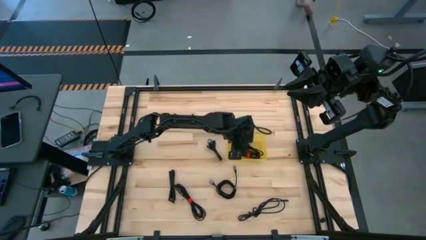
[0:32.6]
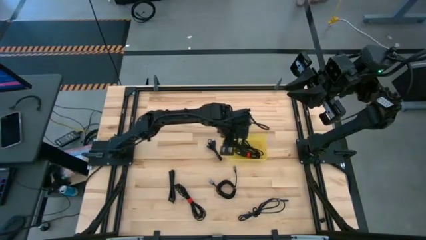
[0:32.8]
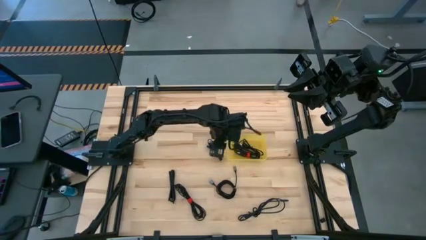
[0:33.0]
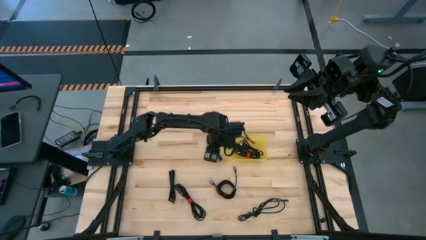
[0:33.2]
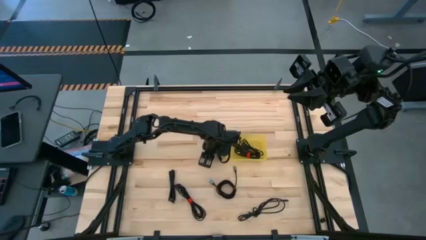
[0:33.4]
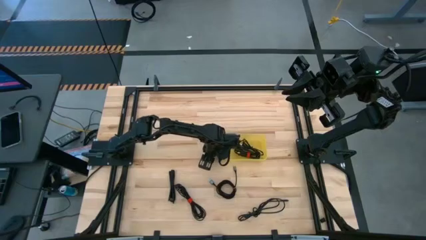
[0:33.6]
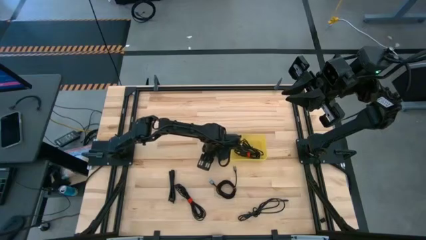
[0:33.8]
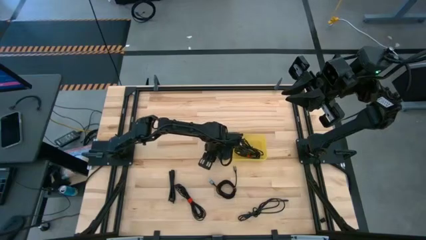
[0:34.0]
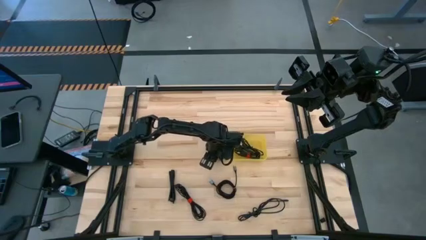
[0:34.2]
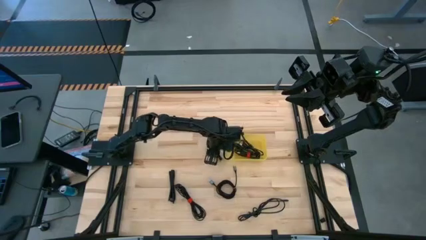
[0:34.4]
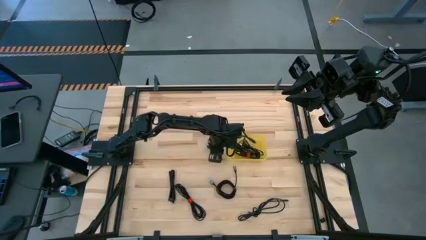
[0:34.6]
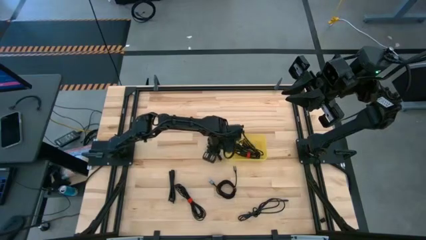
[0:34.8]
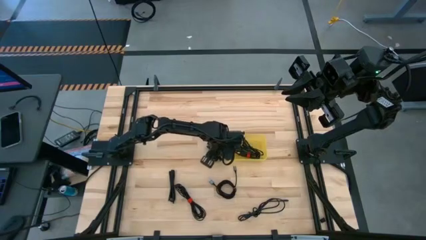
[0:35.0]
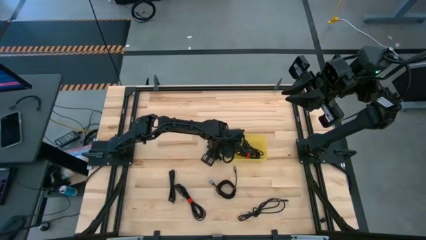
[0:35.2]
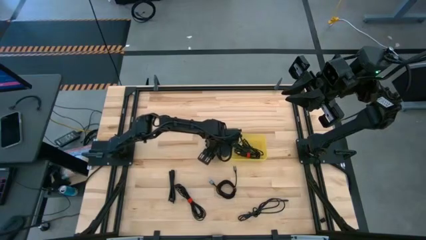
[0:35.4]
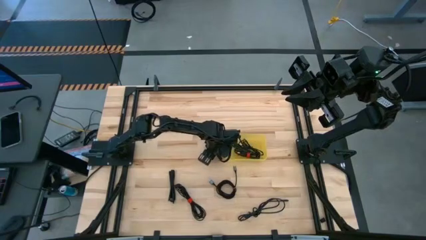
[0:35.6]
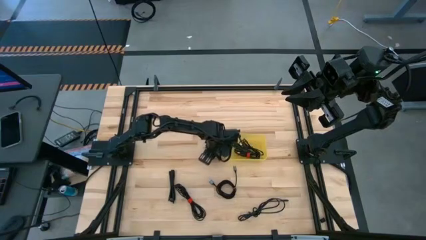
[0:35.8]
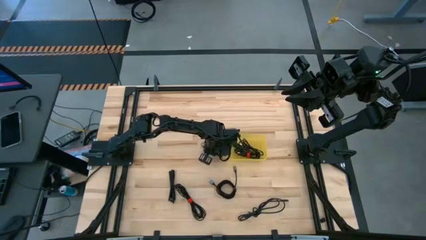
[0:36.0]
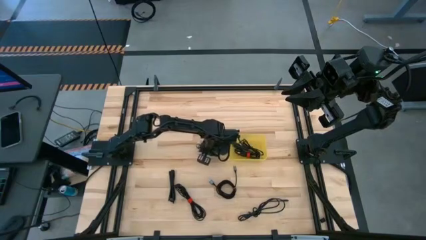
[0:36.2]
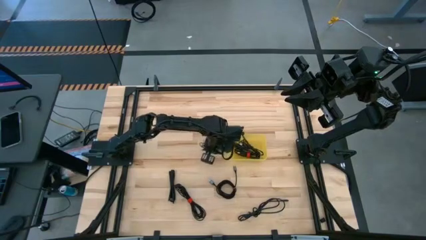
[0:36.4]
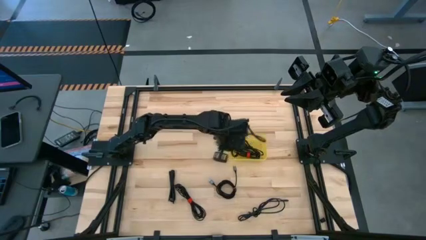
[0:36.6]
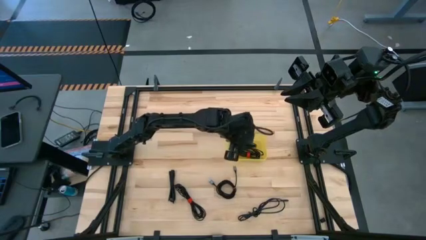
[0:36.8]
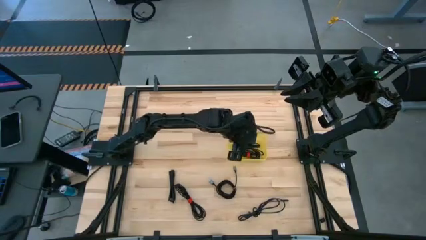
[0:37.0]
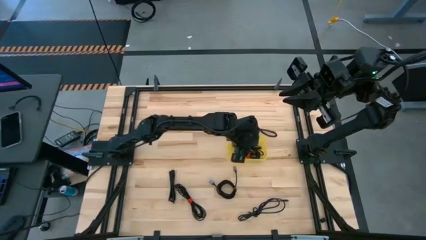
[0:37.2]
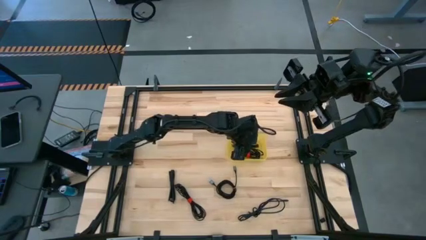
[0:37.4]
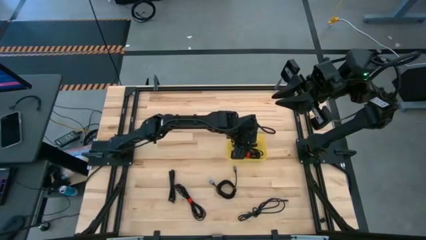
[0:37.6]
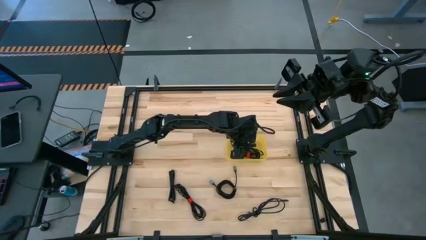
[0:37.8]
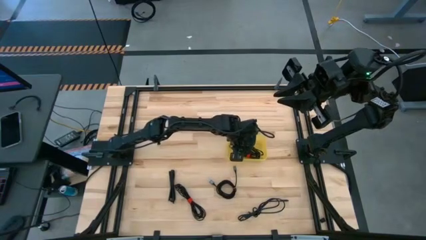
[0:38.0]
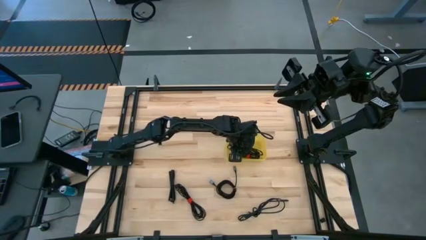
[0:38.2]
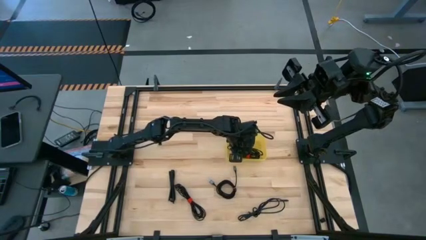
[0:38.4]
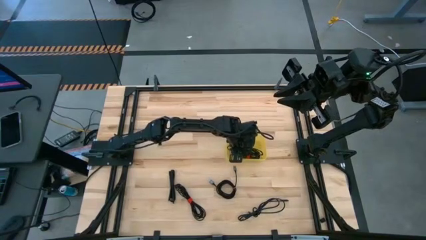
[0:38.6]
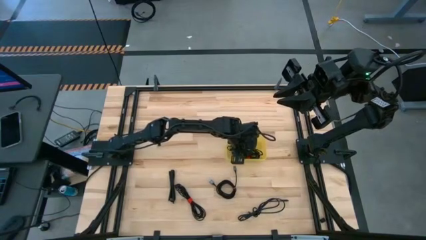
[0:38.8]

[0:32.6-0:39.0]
Task: Pick and place USB-C Cables
Put the black charger cable into the yellow bin

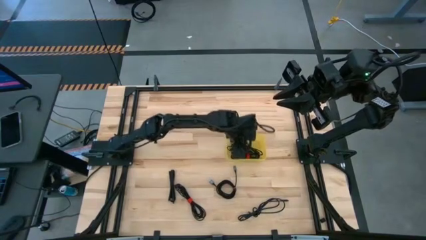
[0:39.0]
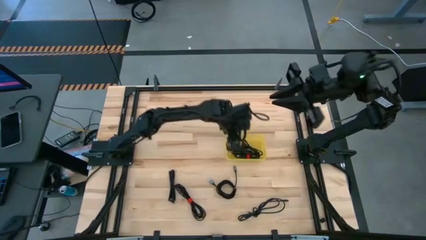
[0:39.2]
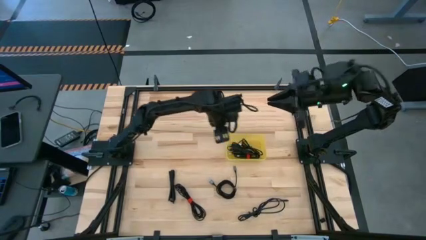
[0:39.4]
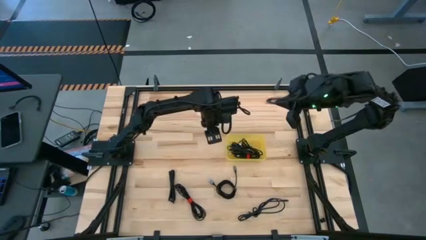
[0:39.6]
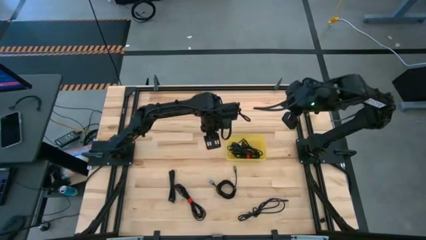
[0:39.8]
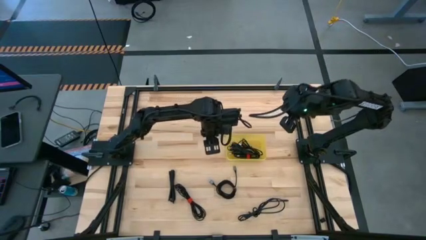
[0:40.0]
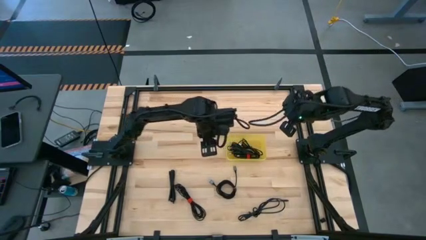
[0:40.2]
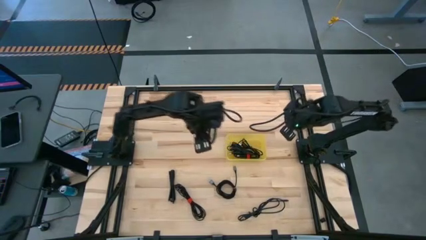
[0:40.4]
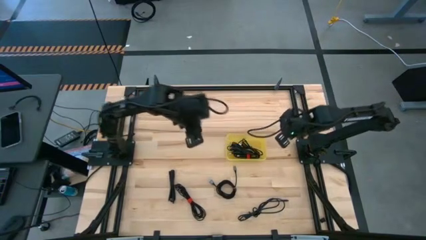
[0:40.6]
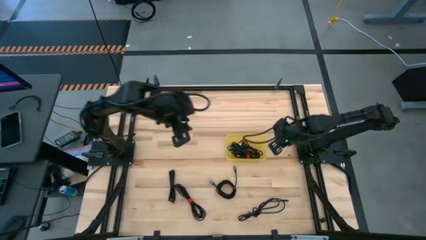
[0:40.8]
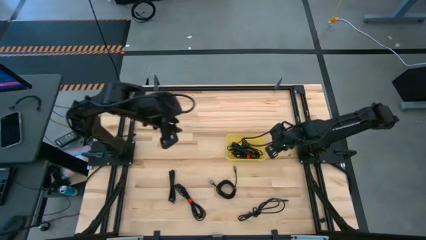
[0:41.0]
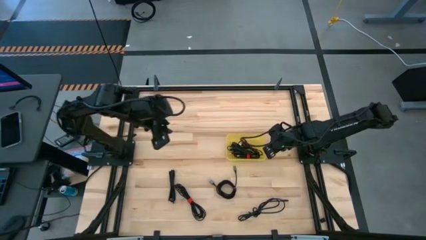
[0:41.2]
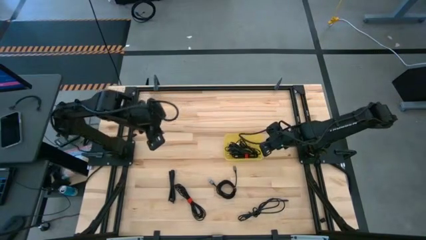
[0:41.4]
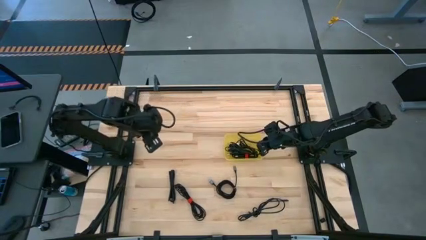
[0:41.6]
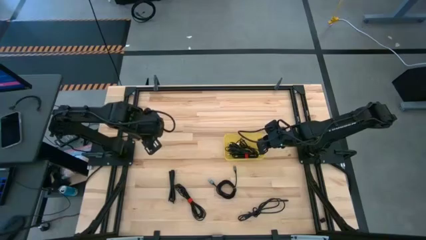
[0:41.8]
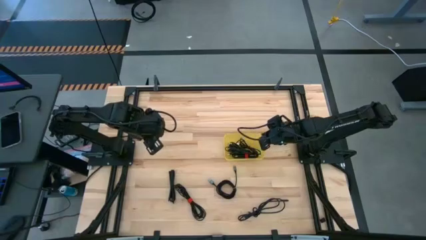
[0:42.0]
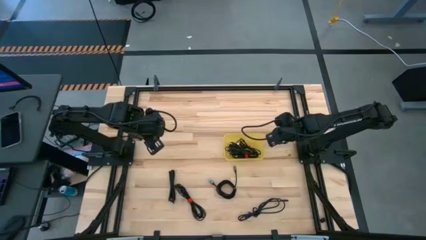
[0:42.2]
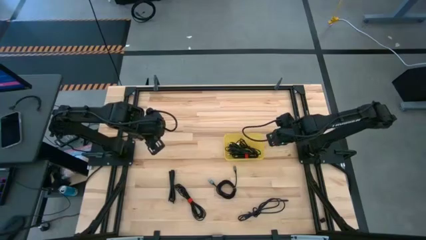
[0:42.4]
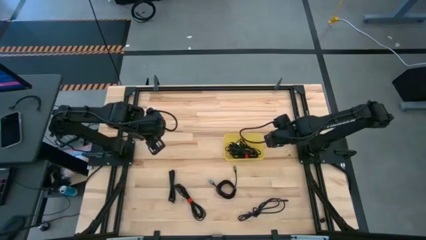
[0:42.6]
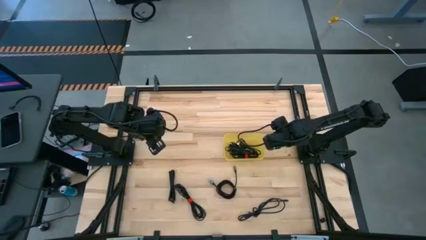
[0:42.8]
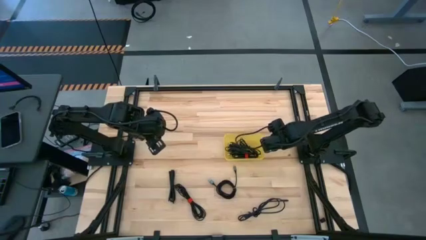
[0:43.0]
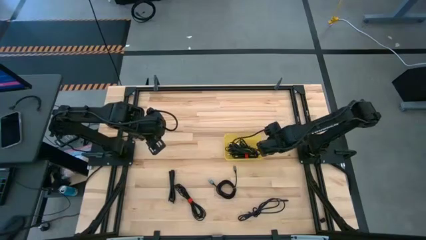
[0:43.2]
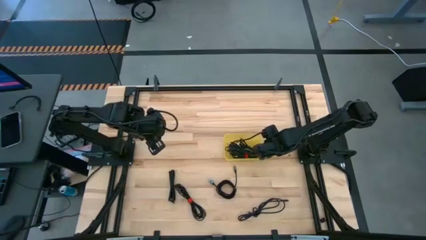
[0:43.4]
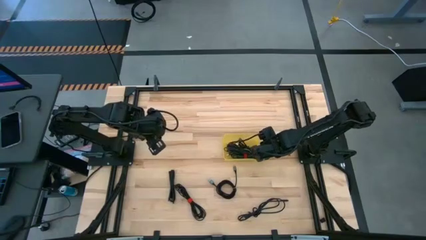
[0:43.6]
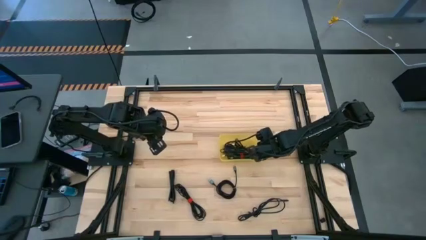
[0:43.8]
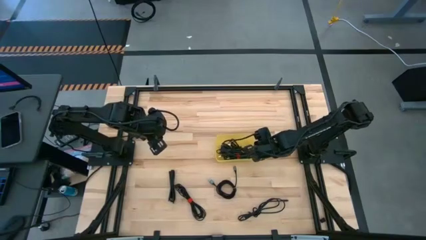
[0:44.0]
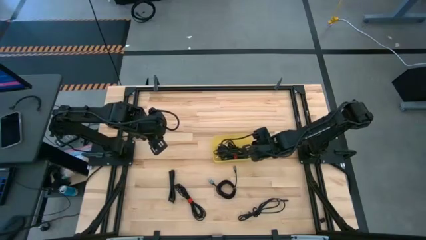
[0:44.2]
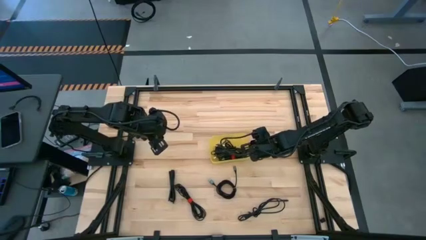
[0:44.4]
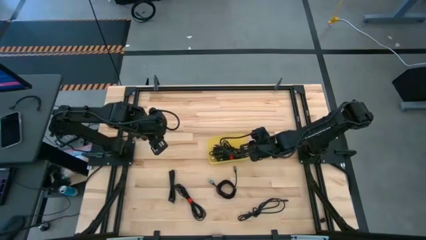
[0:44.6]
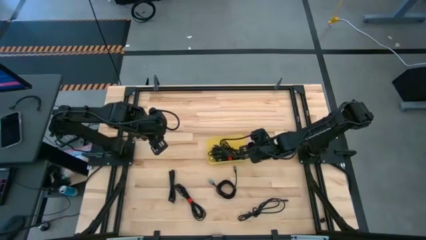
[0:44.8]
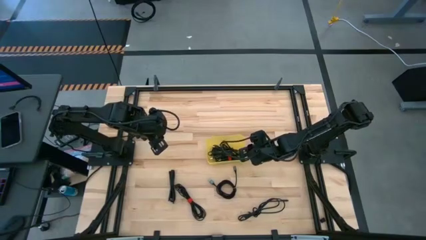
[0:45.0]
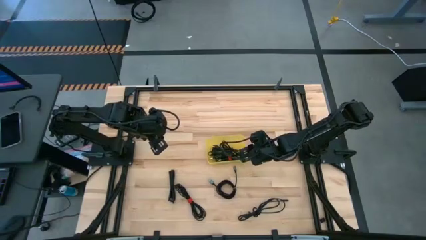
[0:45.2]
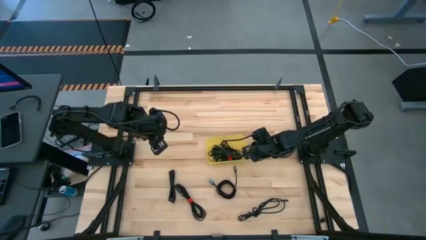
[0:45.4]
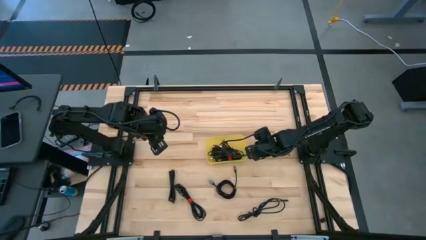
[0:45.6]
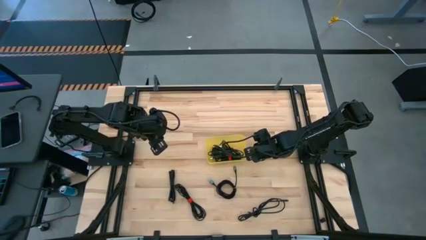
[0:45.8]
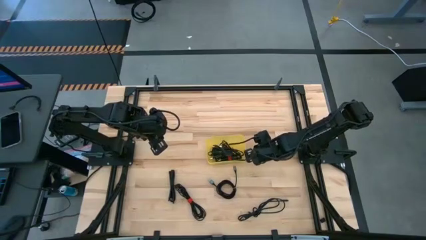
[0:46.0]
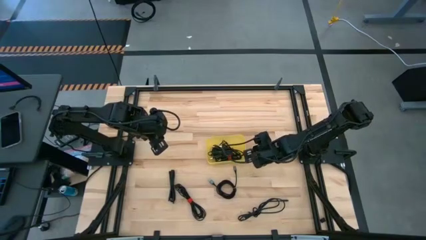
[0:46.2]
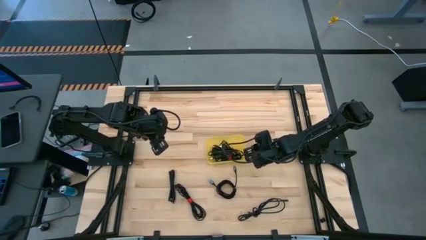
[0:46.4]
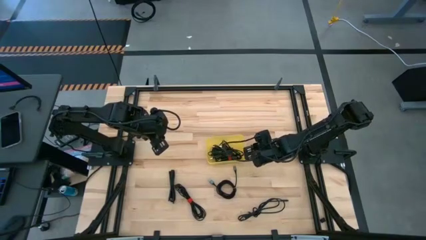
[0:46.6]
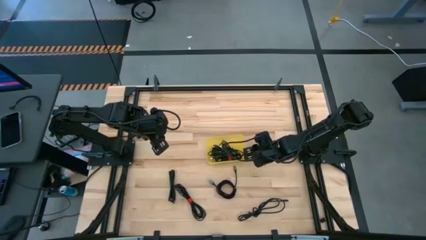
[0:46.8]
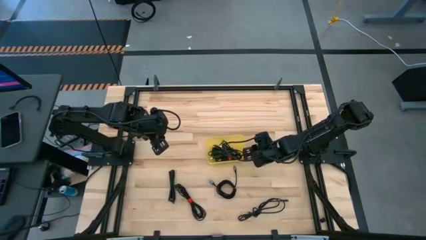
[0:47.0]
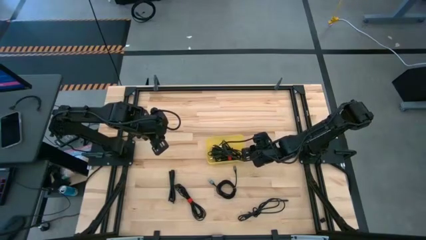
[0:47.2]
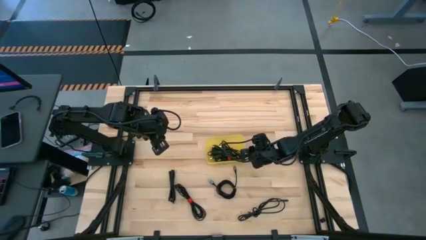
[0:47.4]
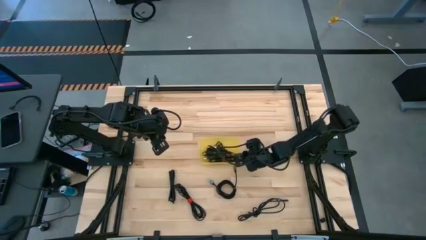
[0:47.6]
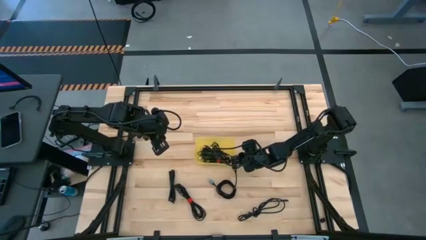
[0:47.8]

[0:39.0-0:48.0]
Adjust the yellow bin
